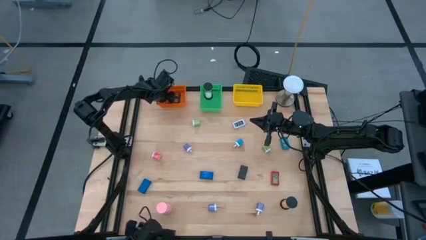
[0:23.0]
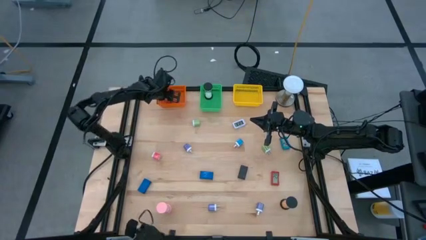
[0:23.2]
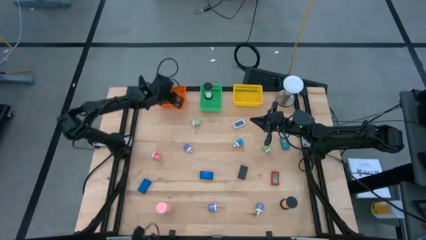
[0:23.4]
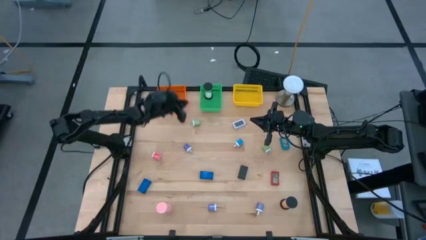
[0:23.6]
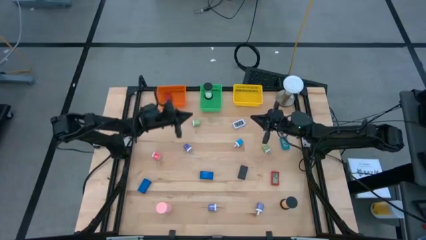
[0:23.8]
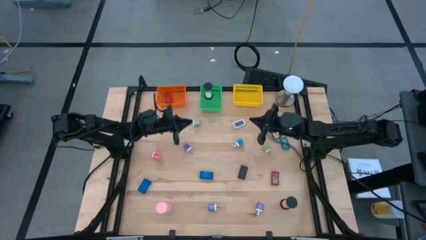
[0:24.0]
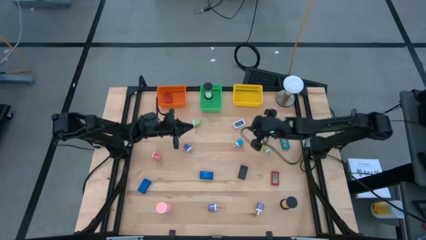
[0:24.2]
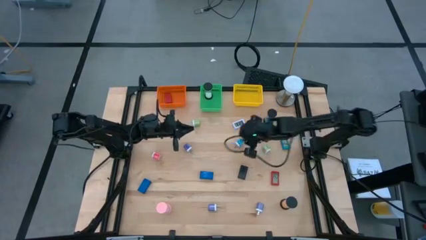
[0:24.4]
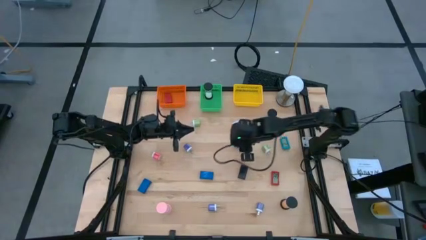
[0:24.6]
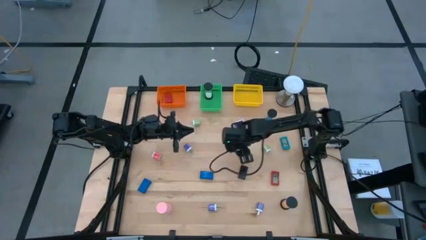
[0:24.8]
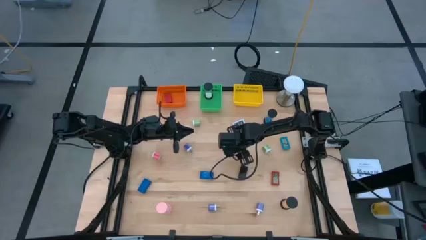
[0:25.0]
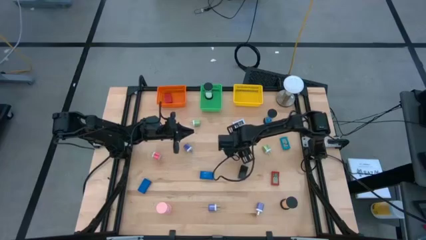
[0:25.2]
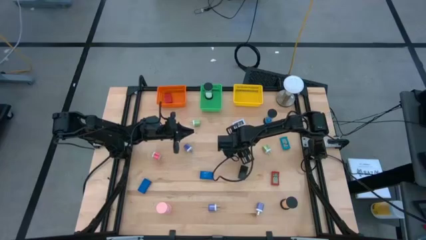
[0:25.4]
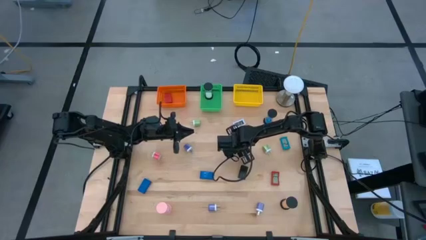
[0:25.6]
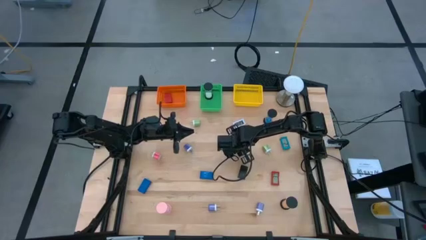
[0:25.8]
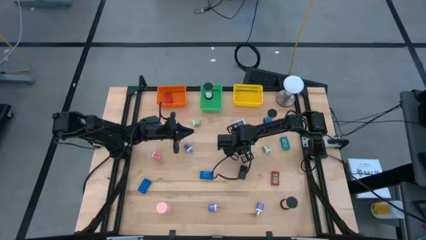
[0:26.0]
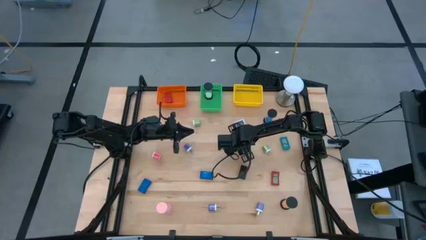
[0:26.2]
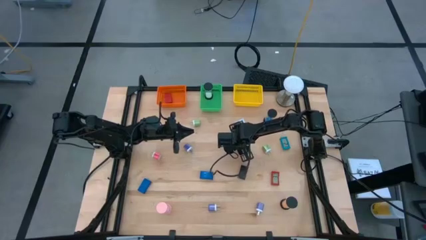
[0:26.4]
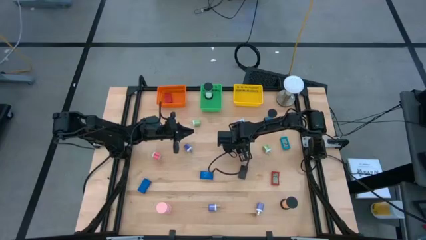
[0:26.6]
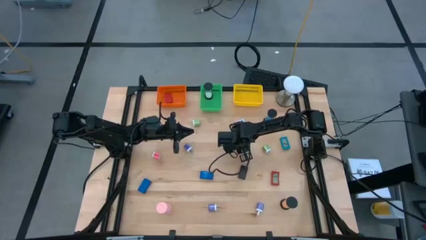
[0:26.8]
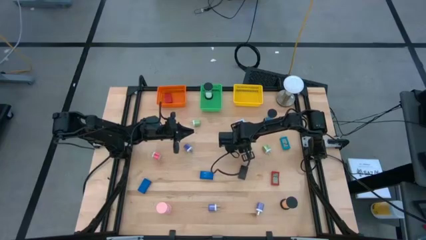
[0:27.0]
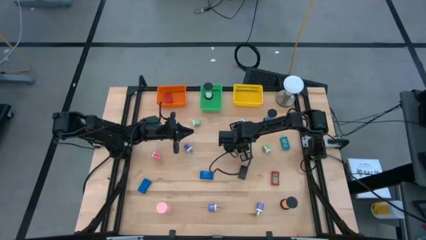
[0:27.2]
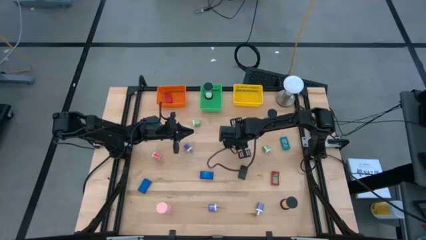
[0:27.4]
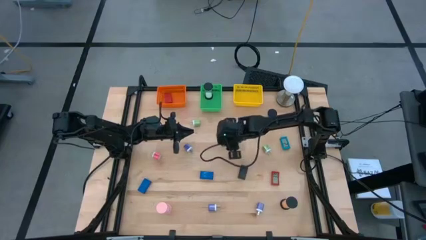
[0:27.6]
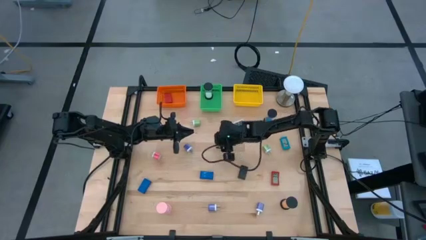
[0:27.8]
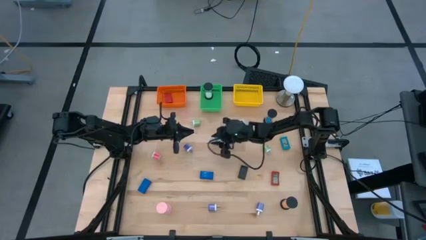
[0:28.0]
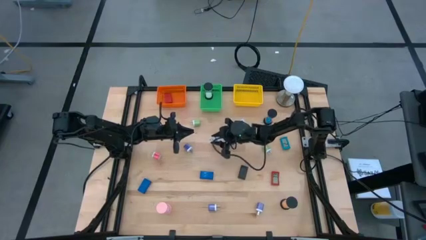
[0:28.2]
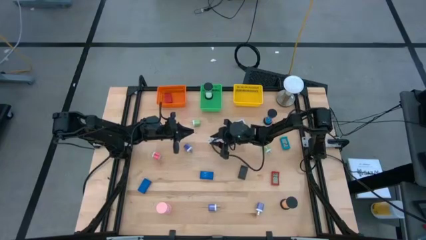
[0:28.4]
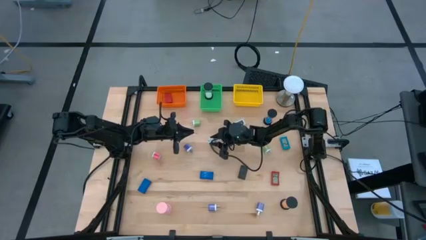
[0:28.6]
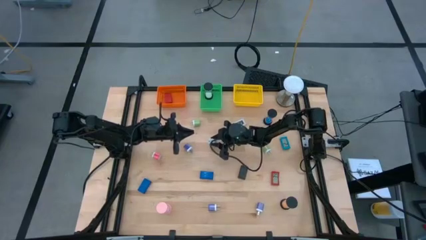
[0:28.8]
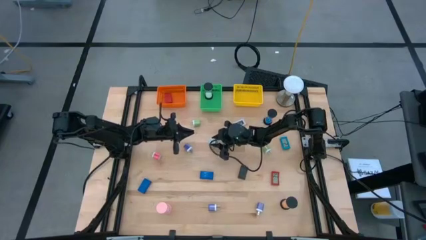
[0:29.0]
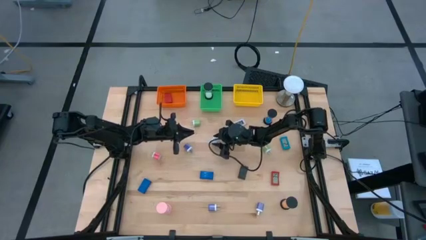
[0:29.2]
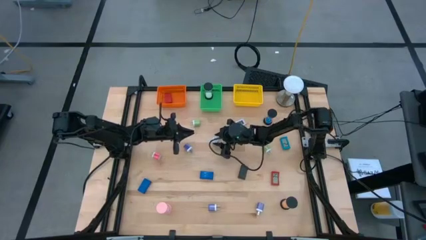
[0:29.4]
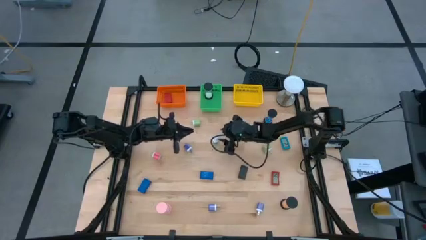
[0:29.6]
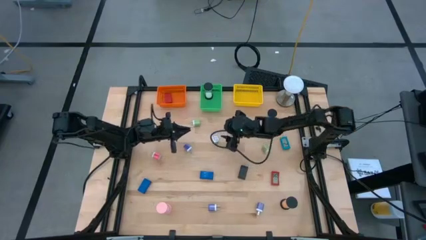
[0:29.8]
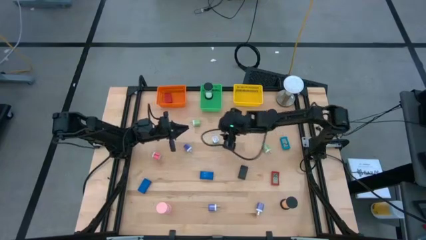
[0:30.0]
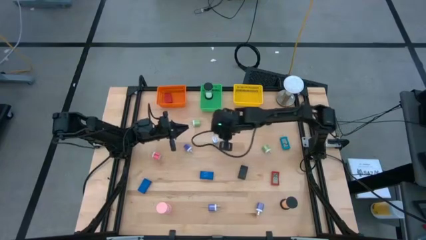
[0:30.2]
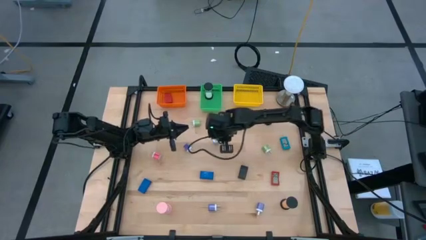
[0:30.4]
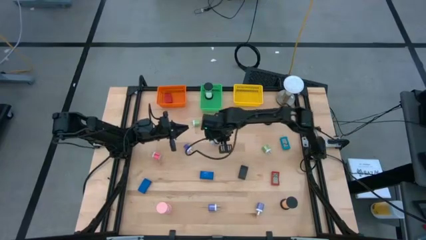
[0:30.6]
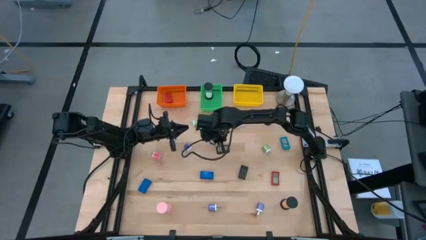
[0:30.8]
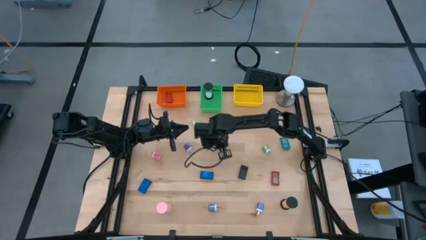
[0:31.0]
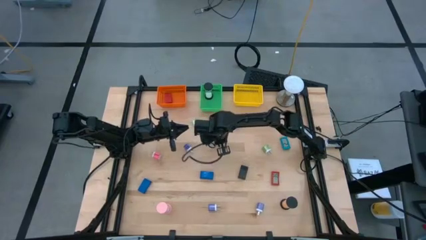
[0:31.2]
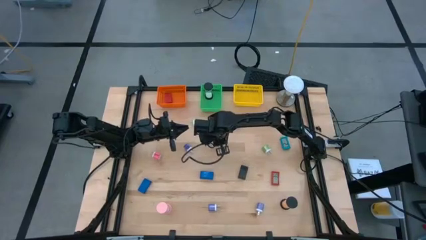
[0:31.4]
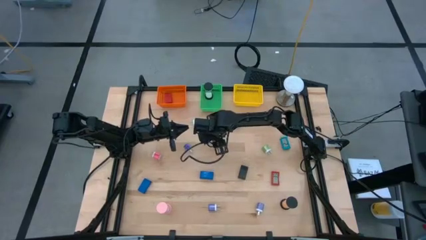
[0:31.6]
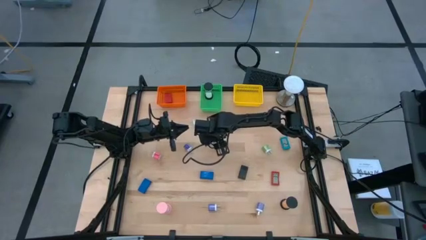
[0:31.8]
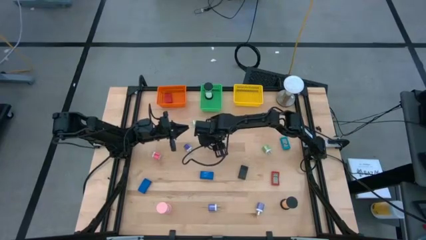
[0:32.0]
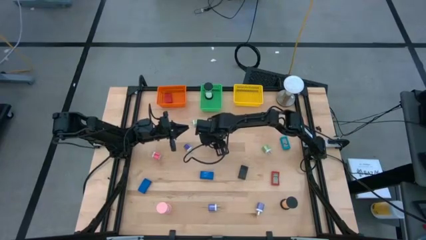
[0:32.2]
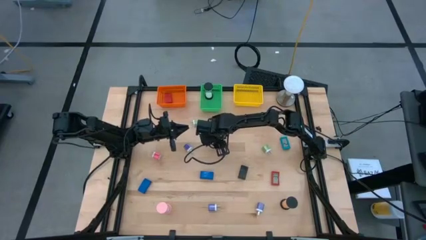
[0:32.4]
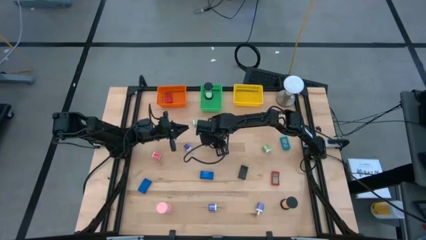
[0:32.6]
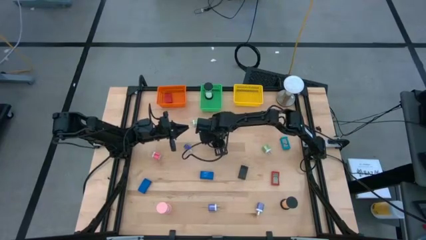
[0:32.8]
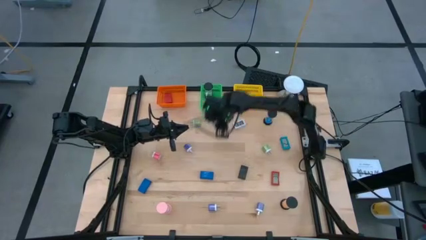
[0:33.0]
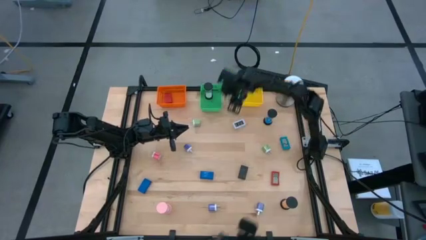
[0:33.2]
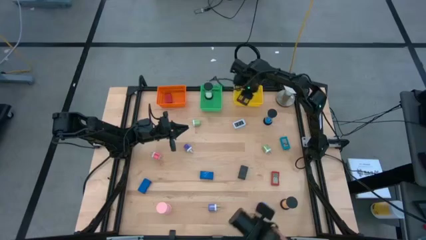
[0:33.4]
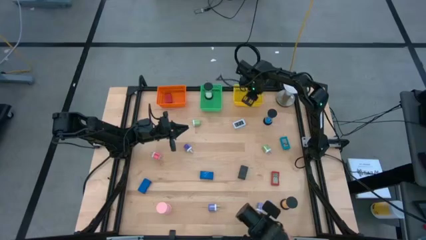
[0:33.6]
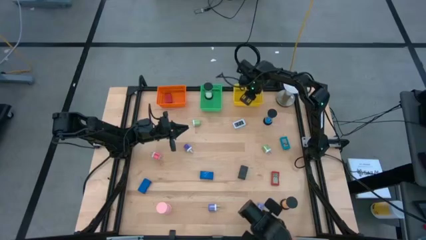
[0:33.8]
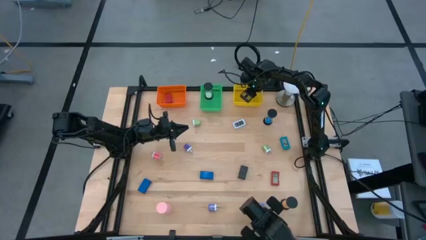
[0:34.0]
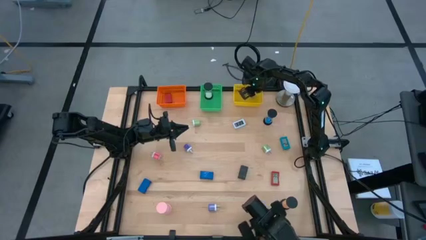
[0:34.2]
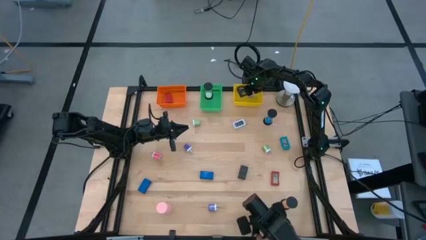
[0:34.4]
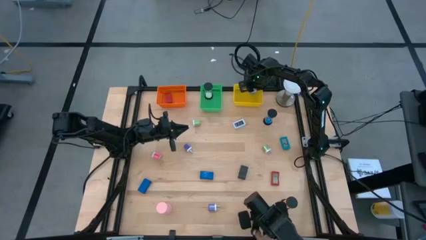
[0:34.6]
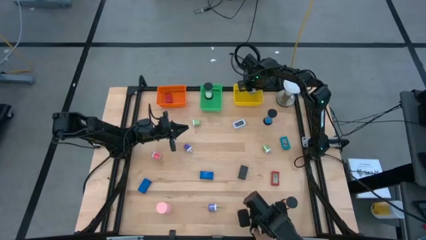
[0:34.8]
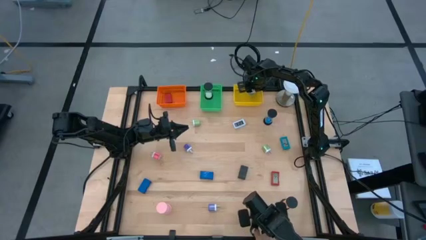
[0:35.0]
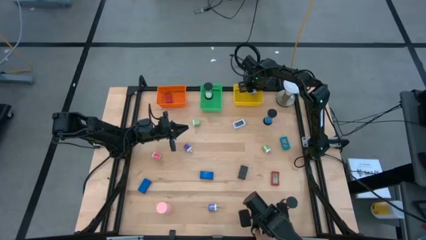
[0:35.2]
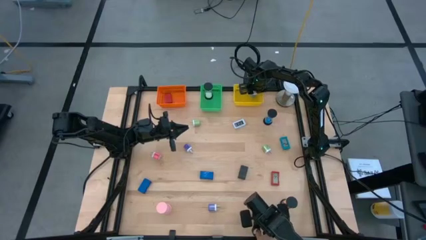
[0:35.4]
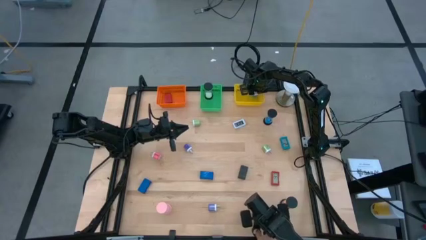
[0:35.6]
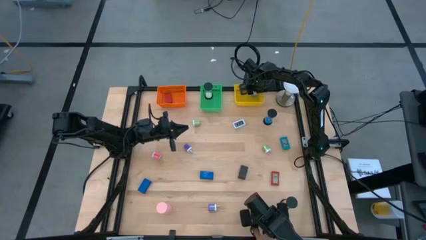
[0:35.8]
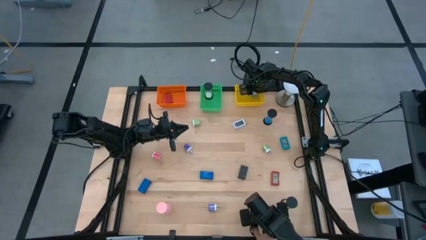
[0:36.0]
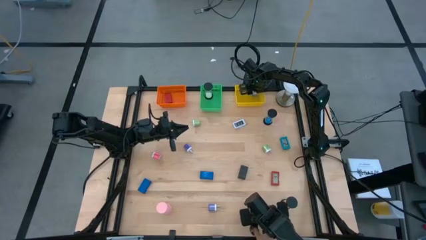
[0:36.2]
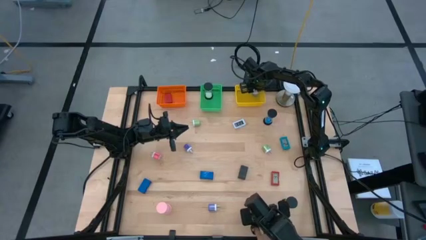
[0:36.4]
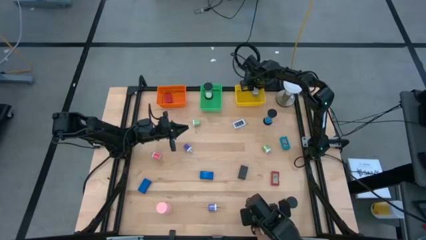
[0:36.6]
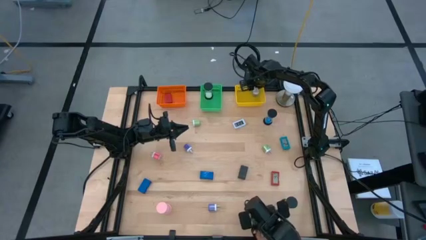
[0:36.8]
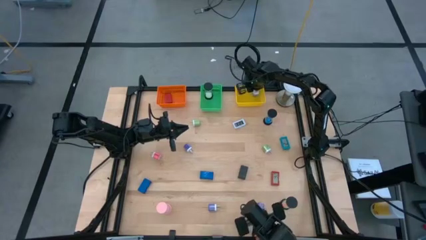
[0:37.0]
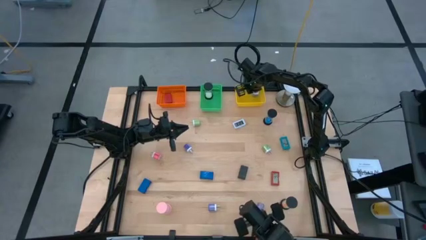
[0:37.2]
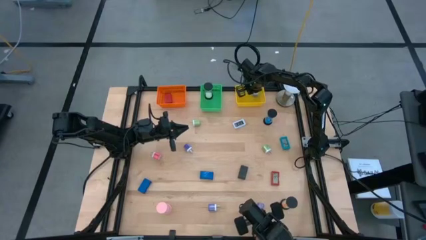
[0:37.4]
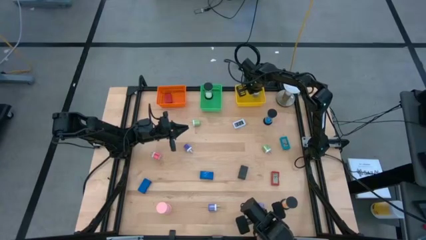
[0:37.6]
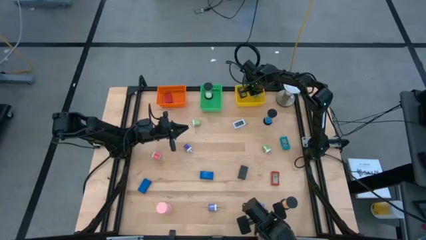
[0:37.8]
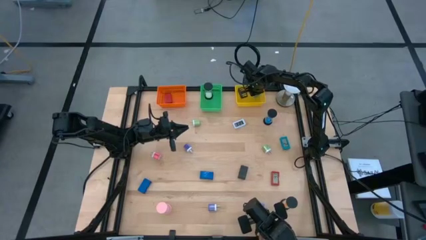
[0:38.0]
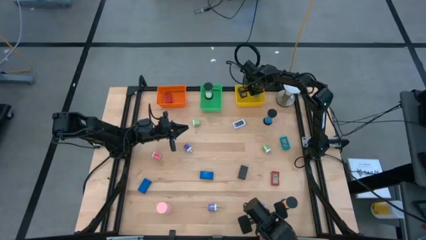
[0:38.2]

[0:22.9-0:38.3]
Task: Pick & Place Office items
Put the blue charger adapter into the yellow bin
